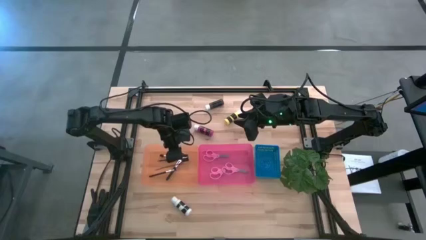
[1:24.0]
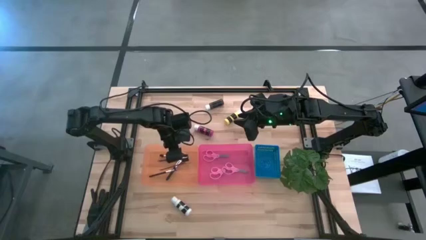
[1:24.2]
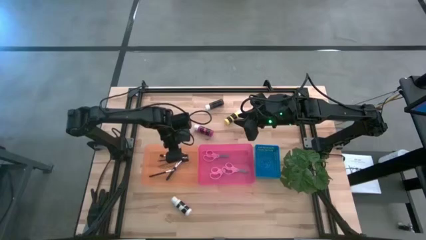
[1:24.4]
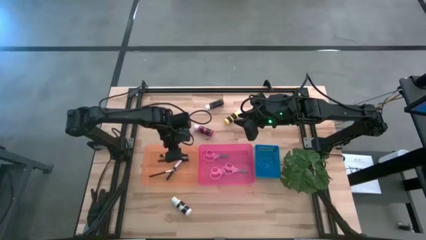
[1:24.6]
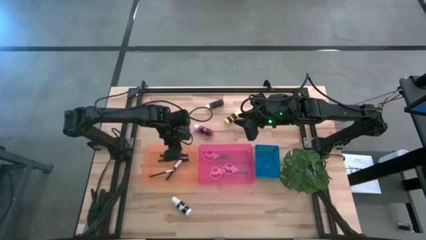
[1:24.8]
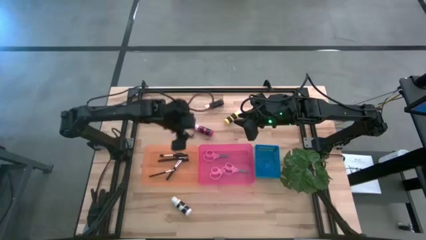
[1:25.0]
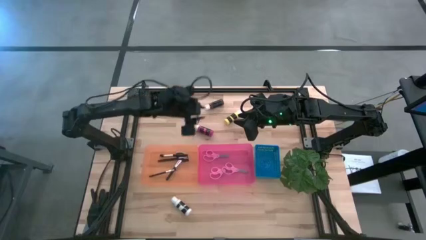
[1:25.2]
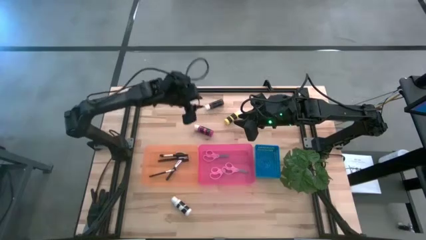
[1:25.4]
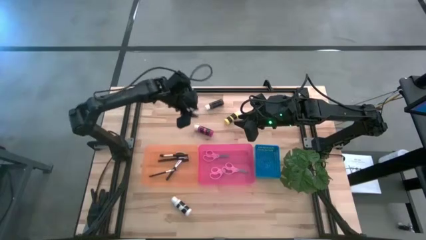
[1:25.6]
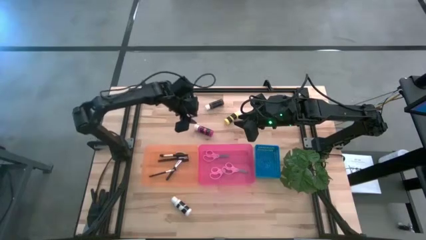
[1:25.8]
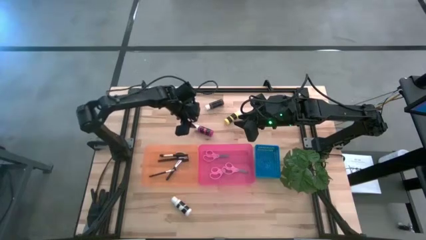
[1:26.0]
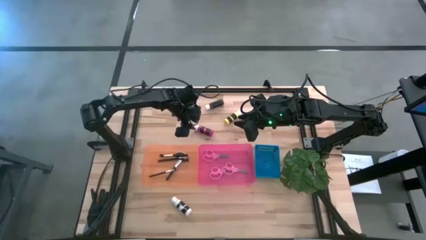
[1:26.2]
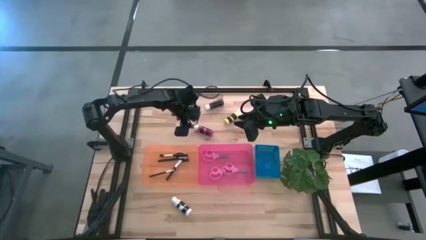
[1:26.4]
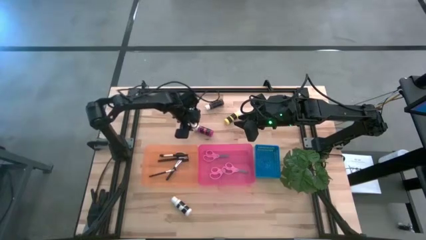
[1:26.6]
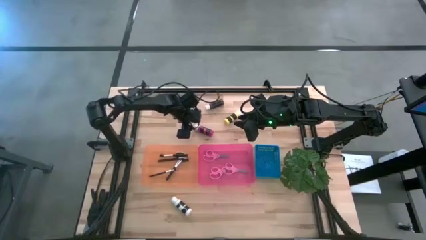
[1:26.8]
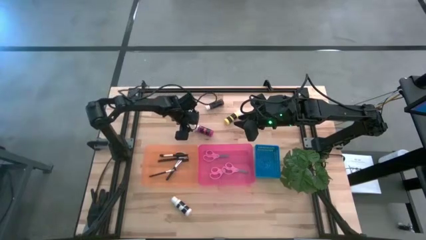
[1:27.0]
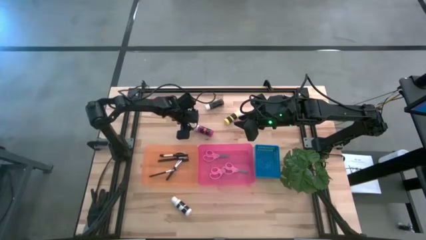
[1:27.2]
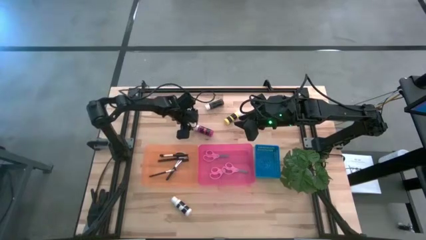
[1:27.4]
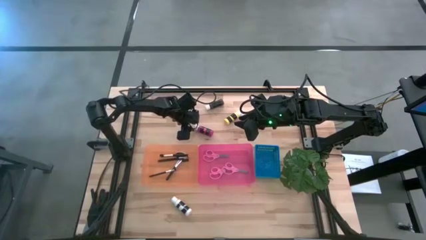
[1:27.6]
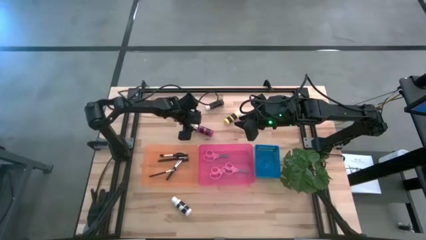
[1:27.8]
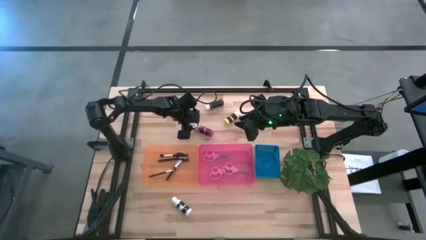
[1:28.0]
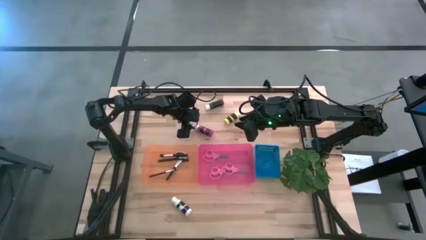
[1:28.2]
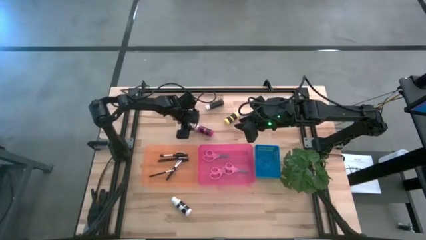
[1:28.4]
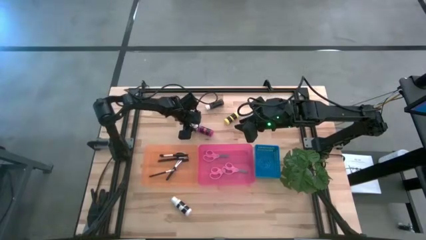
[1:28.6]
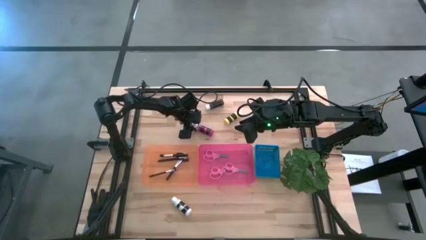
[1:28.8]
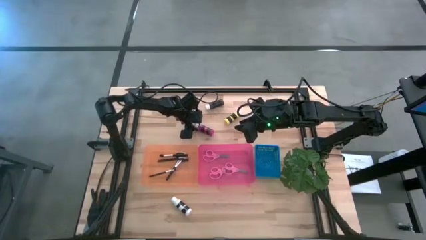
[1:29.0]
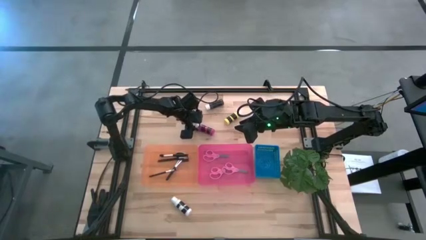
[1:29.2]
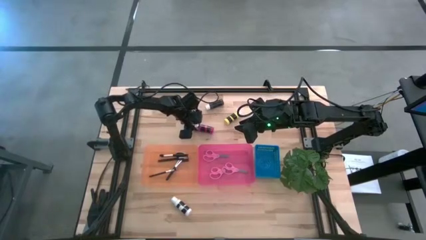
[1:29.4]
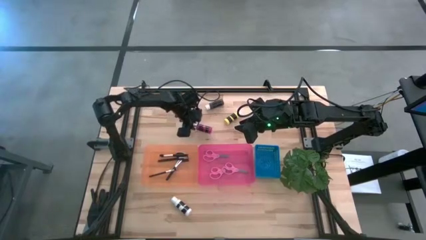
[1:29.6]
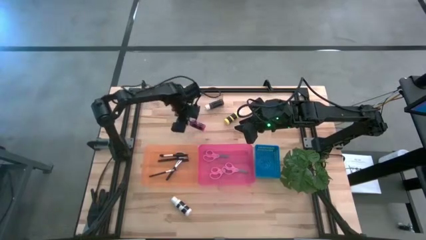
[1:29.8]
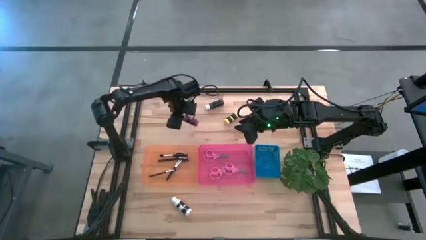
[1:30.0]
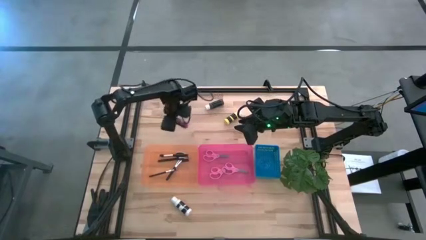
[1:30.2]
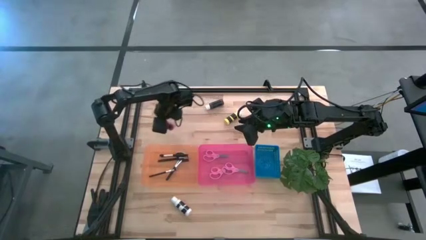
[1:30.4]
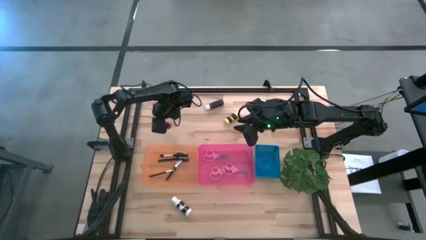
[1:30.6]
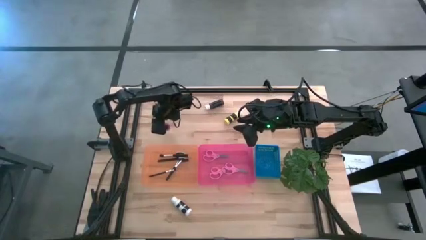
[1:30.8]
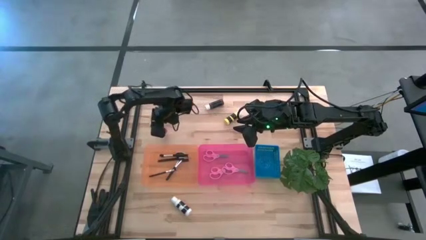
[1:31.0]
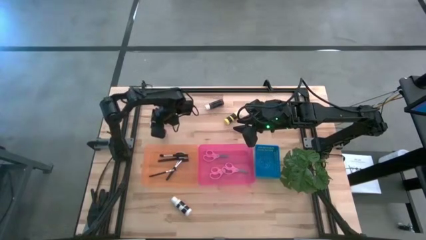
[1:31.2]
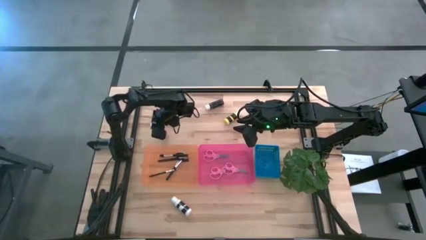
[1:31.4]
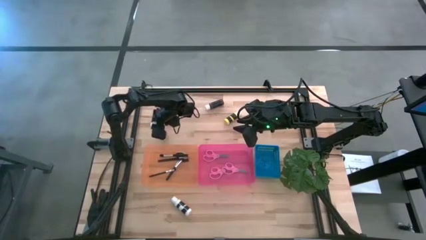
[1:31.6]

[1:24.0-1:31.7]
Task: Pick & Place Paint Supplies
Put the pink paint bottle into the blue bin

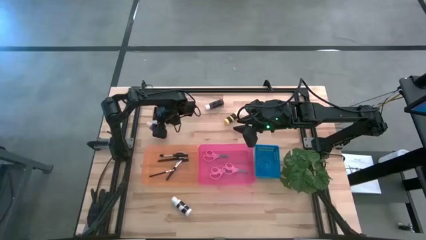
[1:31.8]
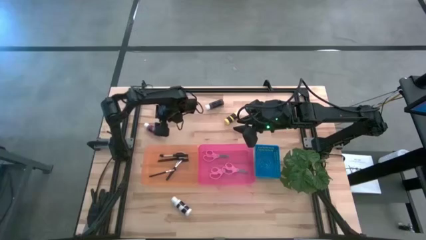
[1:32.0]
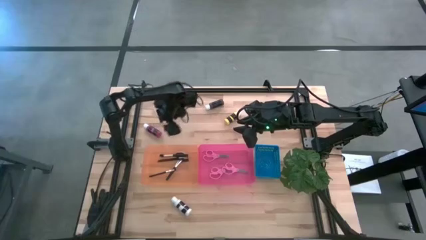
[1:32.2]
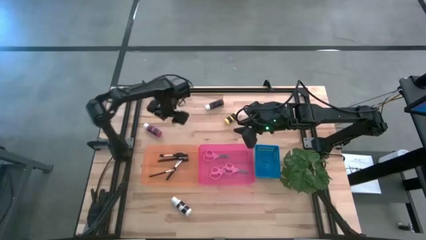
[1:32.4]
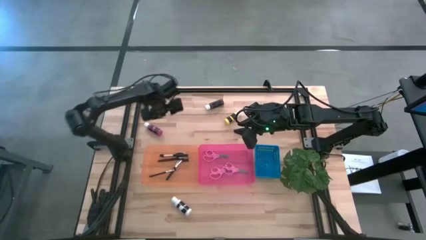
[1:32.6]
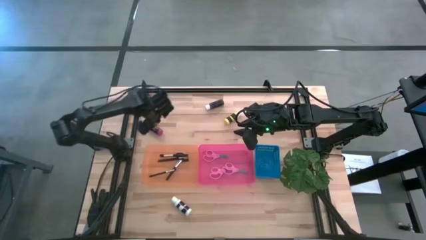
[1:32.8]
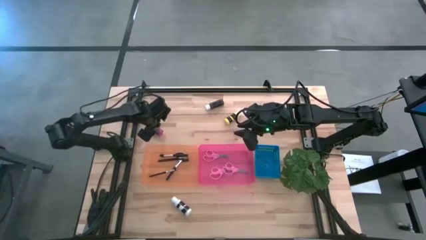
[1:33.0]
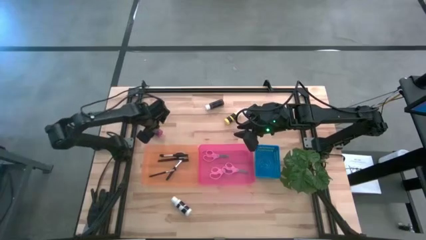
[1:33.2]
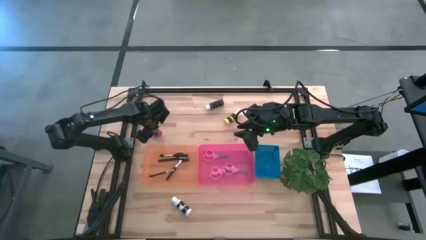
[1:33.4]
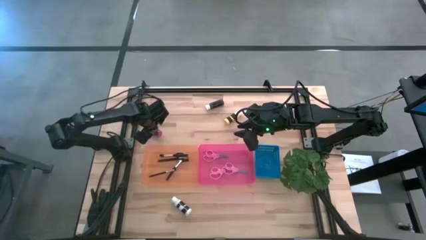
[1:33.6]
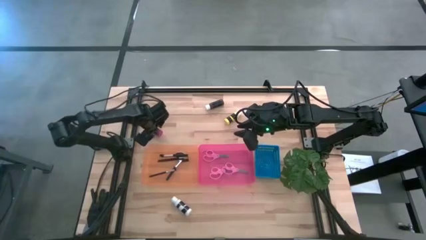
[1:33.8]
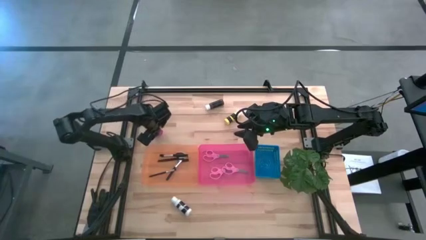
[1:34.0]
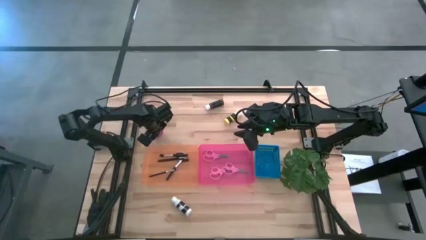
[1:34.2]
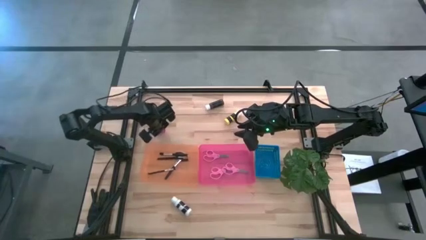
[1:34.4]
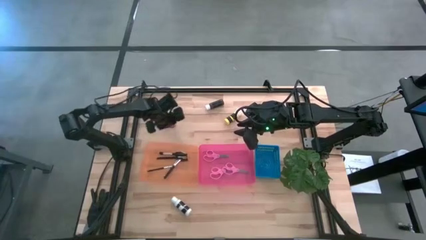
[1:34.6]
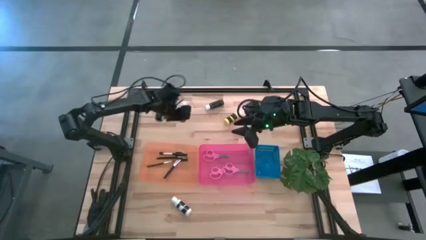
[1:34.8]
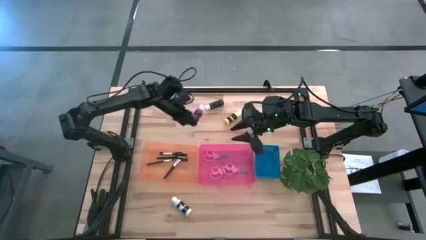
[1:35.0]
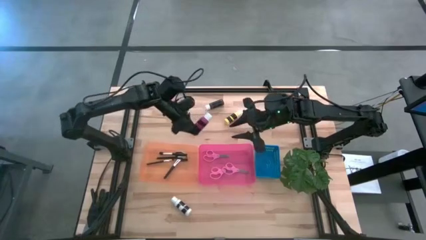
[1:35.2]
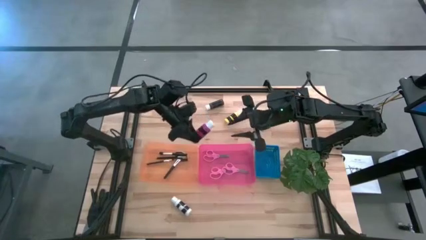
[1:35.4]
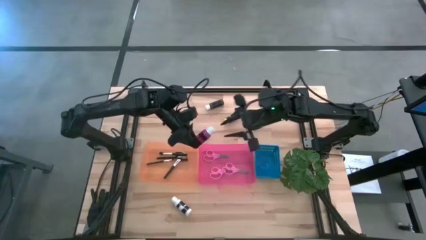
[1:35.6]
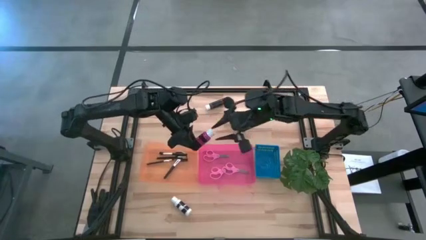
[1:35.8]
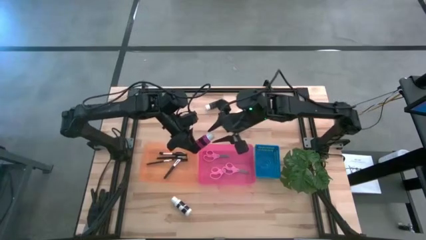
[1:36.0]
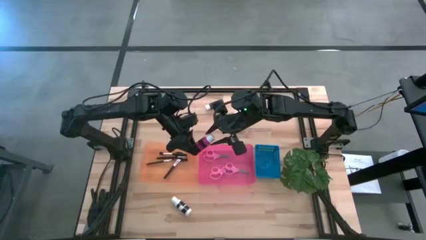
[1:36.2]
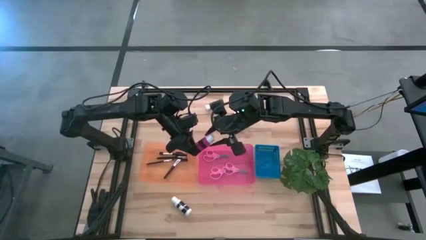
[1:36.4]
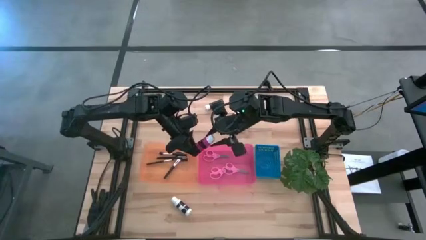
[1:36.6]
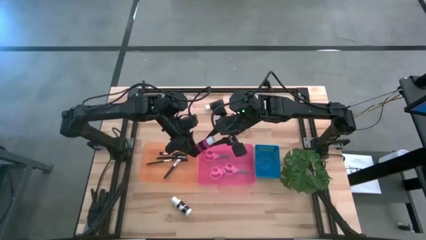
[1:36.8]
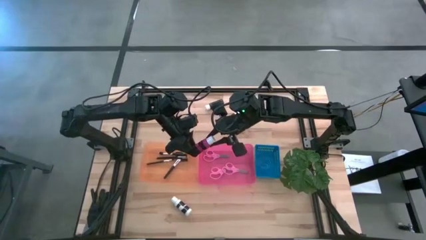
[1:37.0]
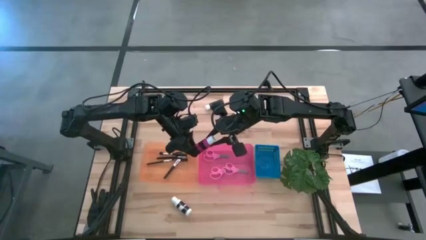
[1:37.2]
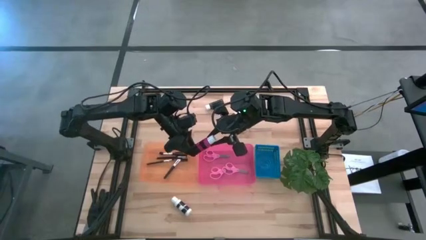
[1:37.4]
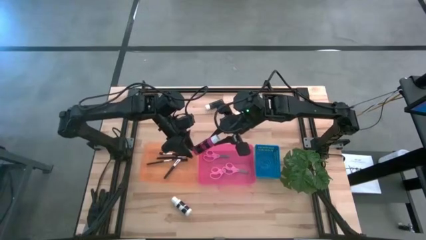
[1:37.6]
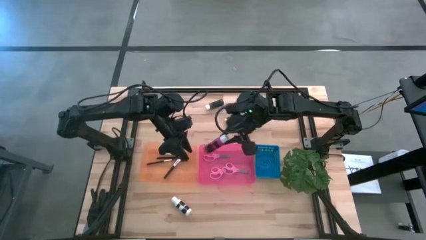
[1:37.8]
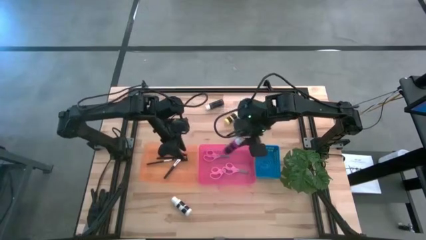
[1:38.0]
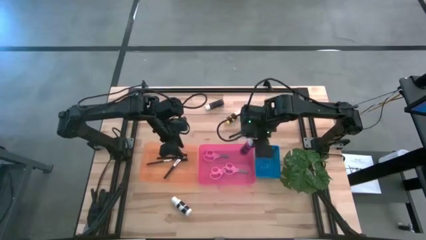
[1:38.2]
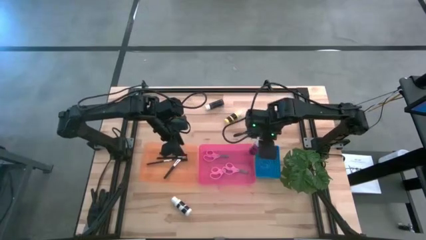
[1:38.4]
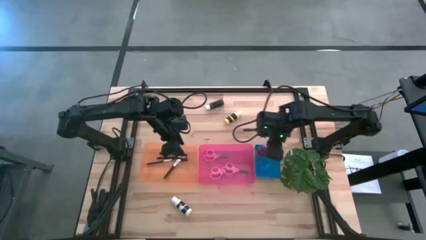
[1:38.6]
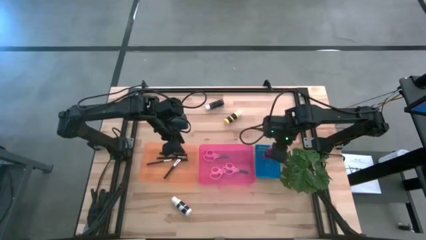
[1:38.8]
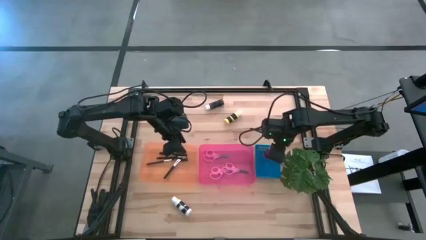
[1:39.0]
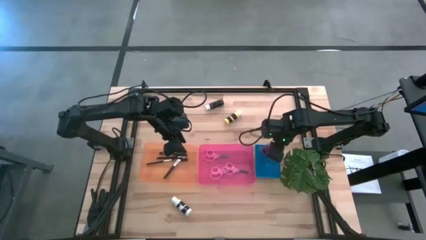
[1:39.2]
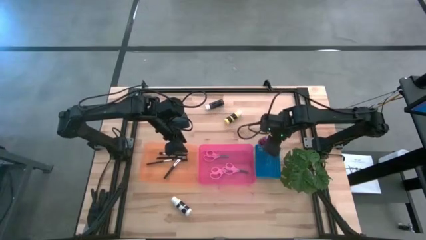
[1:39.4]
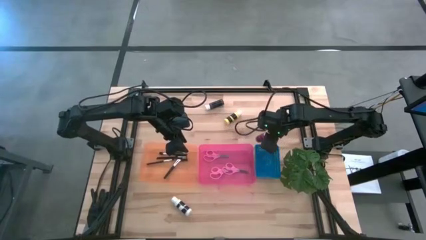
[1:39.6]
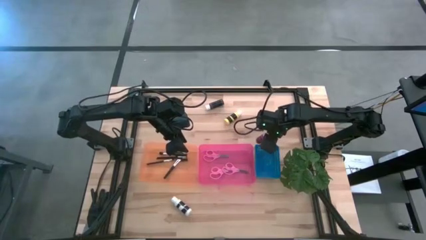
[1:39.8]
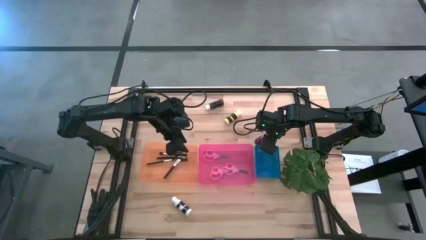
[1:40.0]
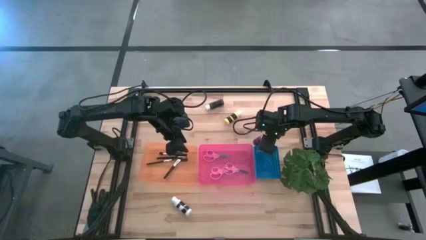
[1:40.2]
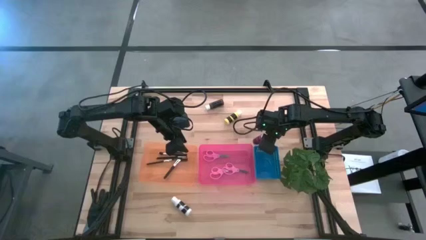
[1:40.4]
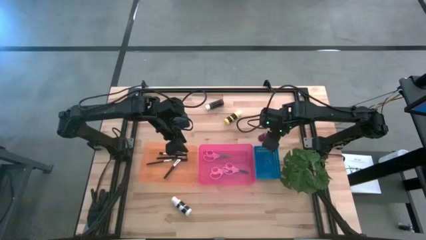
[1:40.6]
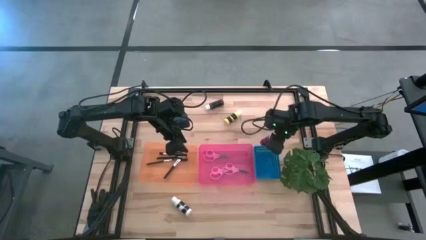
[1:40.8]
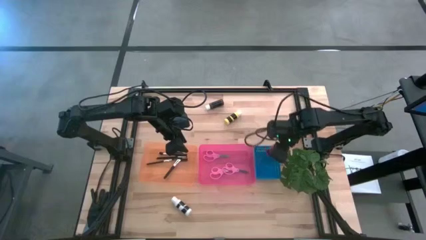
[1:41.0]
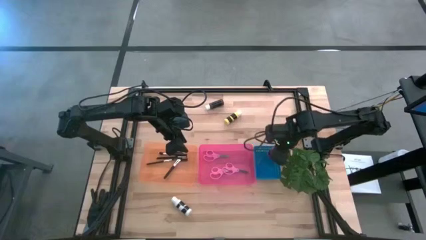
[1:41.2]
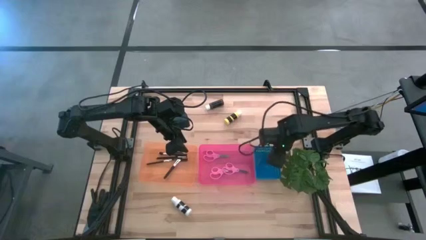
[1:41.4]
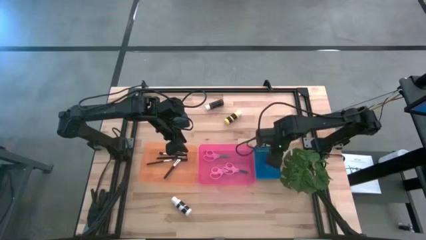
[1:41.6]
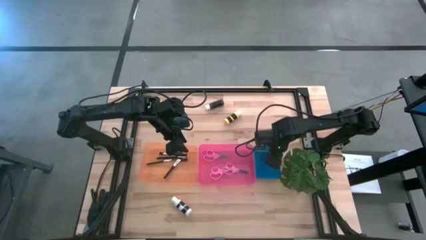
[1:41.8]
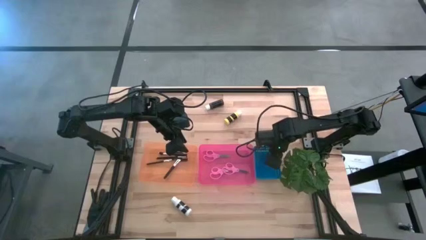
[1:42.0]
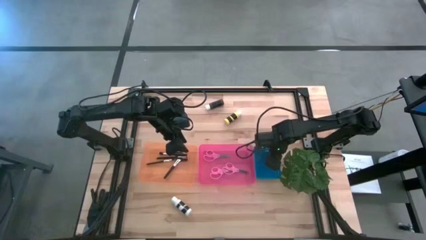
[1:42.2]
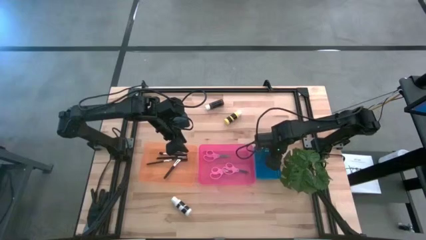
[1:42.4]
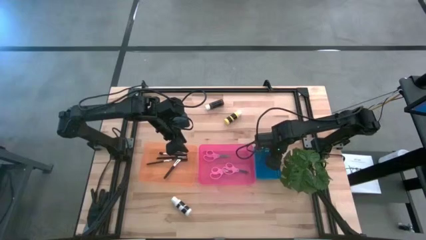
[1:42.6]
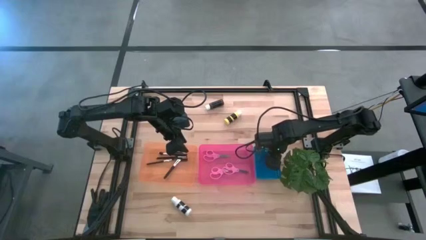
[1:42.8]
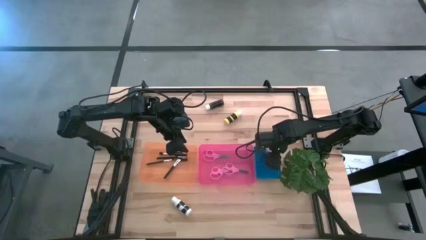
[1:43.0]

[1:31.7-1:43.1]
Put the pink paint bottle into the blue bin
